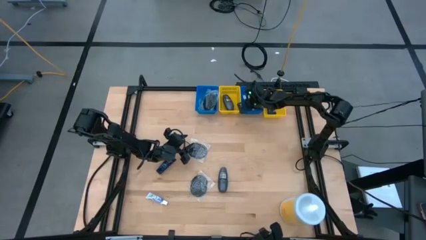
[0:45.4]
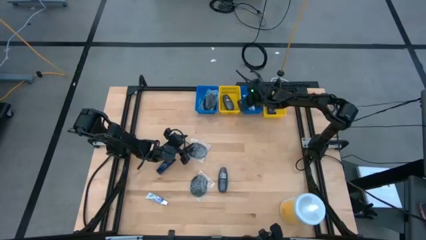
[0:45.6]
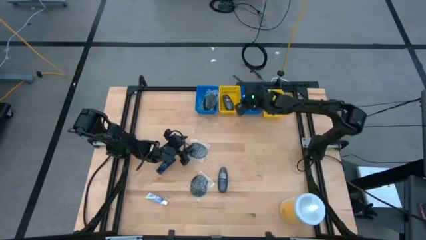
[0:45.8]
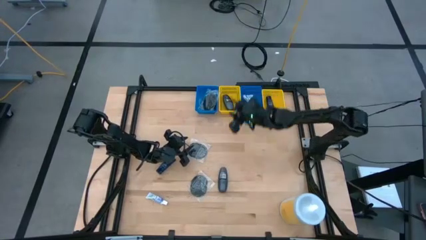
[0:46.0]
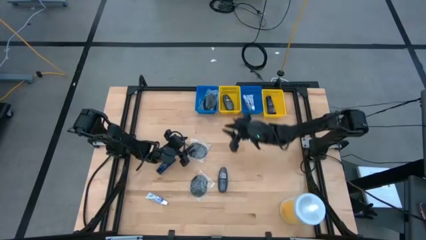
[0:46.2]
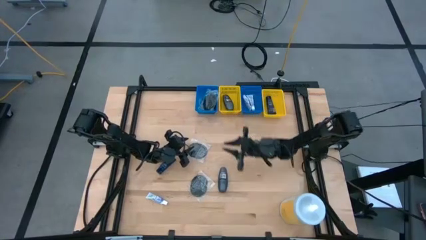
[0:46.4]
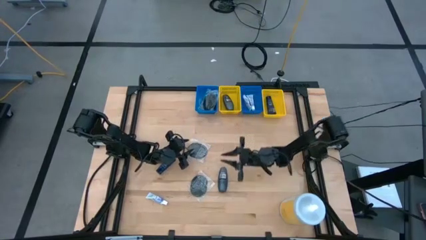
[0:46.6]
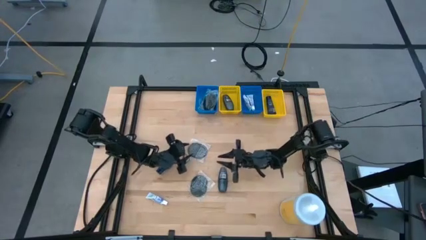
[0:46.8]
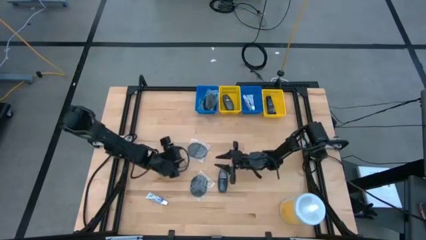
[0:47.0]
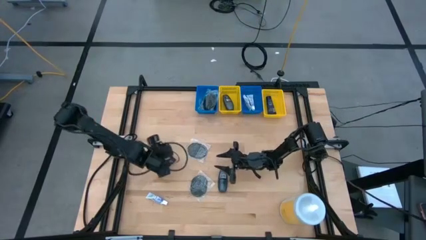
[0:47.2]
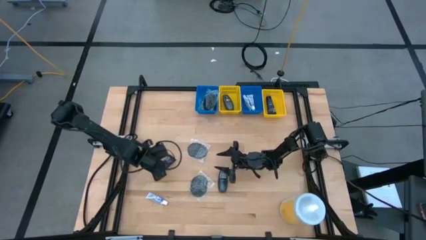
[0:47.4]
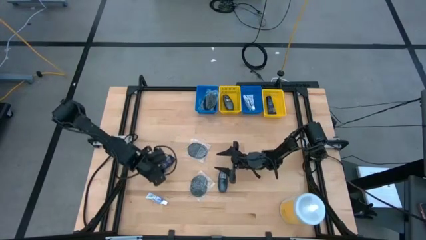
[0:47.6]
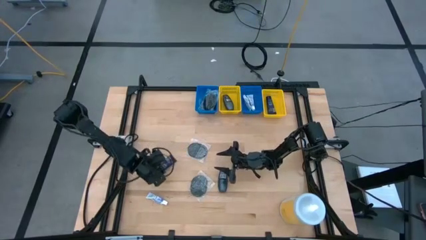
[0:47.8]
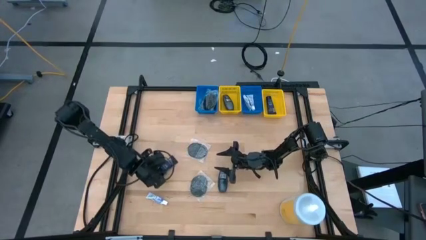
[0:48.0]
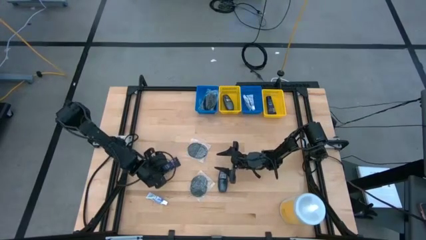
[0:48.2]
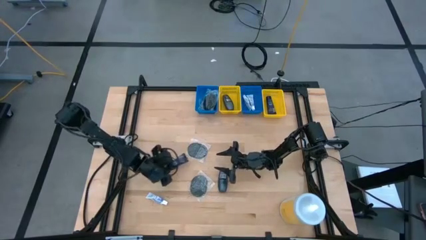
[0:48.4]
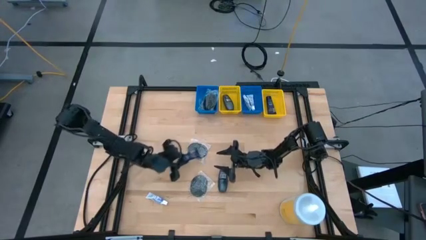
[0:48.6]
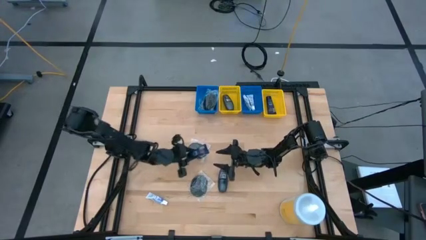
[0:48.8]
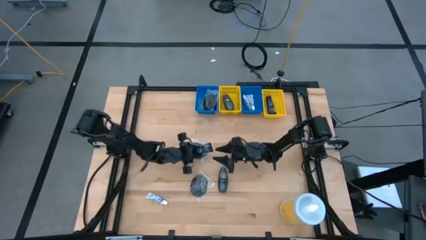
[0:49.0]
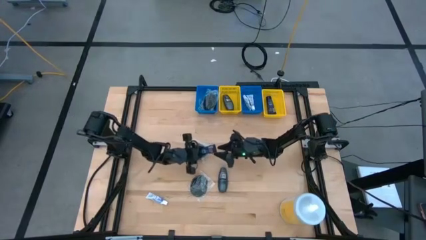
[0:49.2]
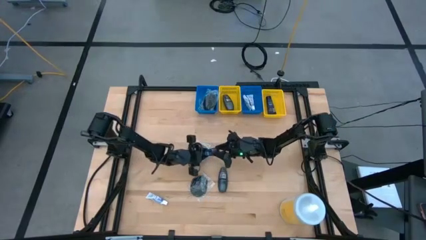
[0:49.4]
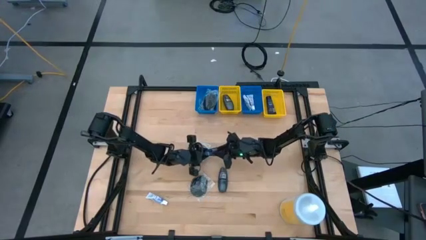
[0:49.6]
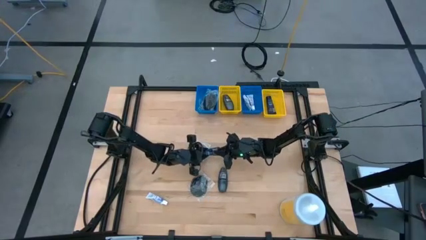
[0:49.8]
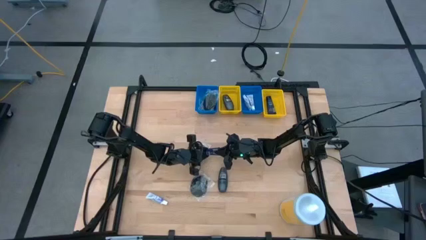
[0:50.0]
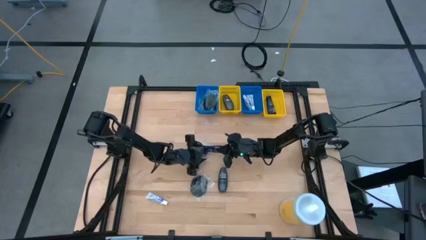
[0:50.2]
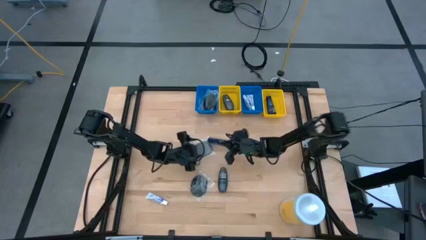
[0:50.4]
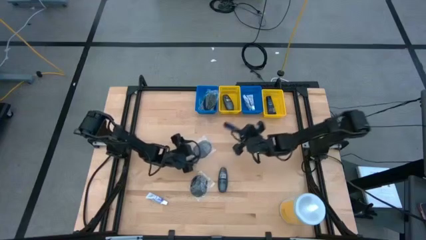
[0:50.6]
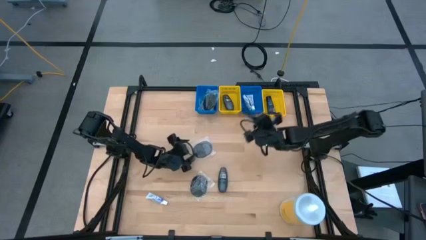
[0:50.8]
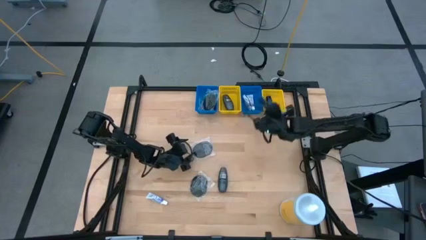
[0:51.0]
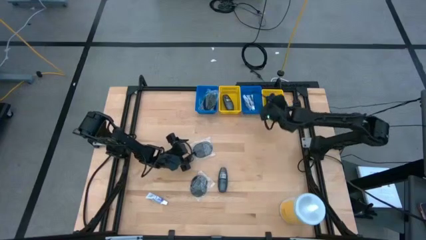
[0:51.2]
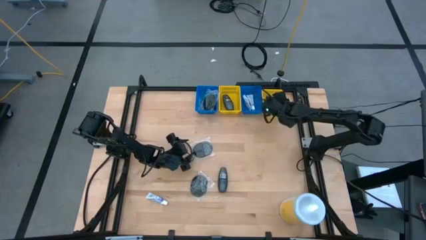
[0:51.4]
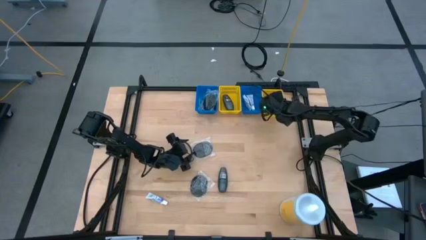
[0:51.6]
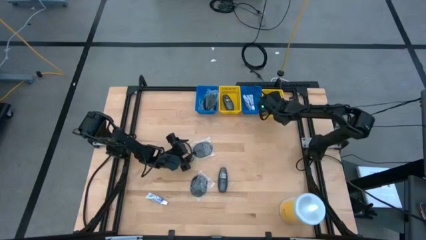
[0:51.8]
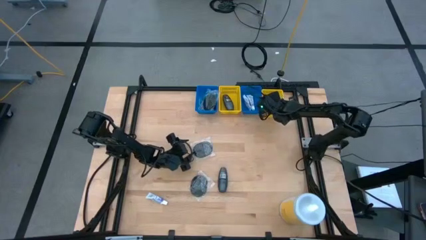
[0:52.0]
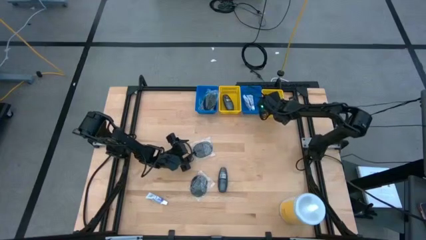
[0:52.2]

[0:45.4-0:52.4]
Task: Pick & Place Travel size toiletries
Put the blue shave cream into the right yellow bin

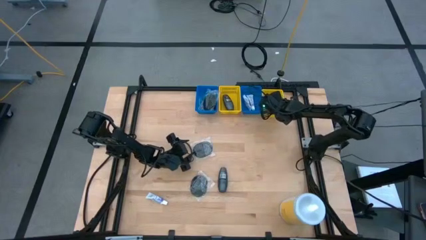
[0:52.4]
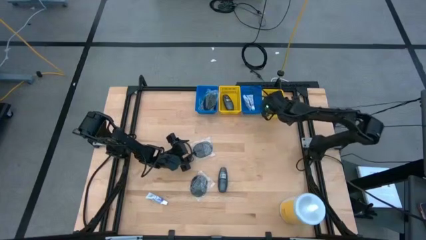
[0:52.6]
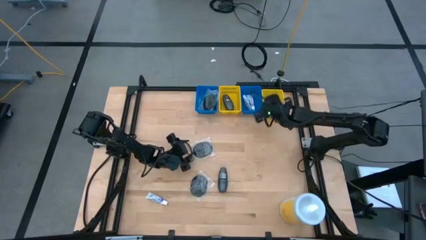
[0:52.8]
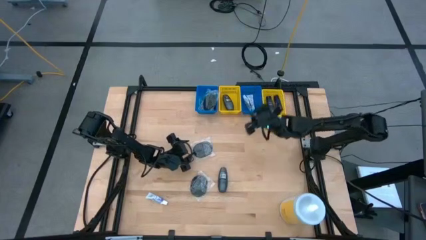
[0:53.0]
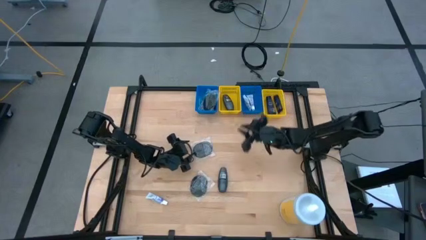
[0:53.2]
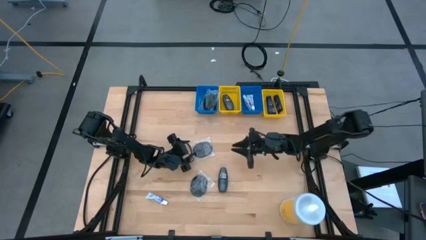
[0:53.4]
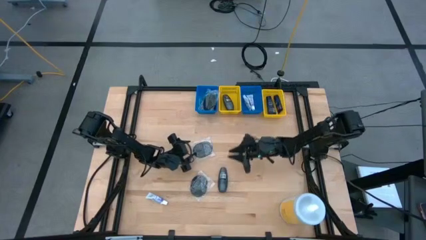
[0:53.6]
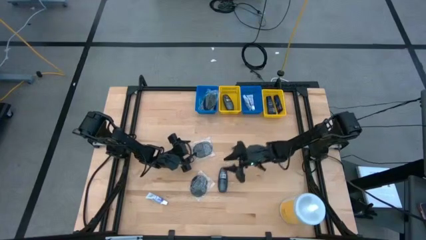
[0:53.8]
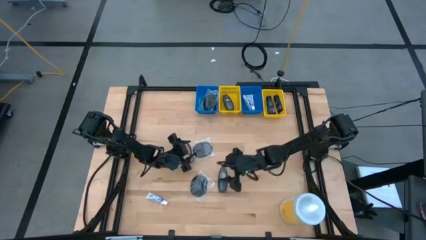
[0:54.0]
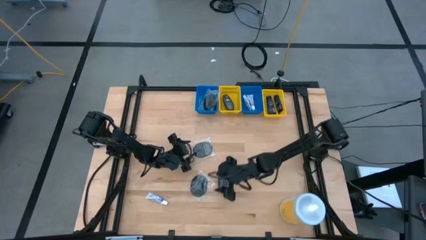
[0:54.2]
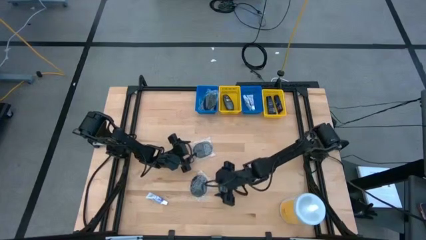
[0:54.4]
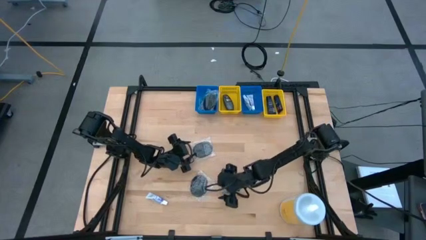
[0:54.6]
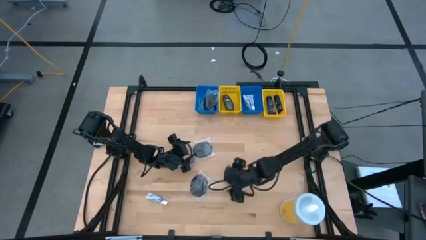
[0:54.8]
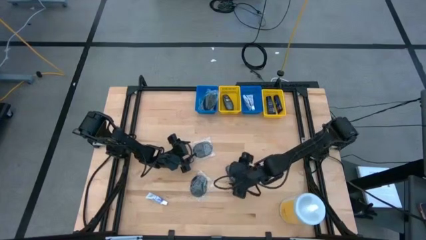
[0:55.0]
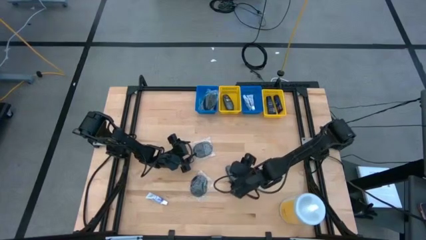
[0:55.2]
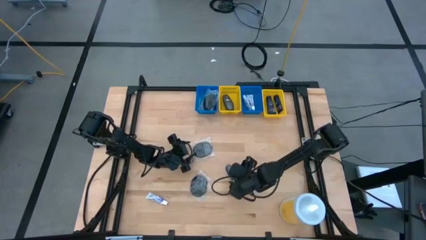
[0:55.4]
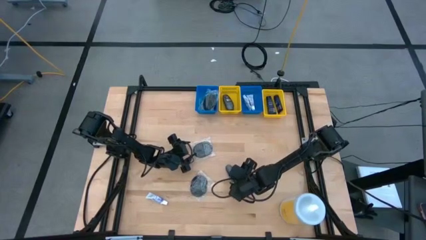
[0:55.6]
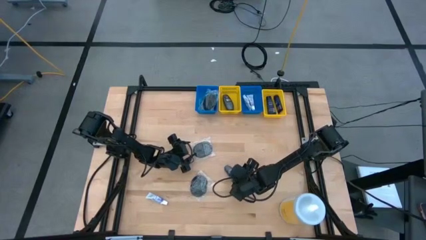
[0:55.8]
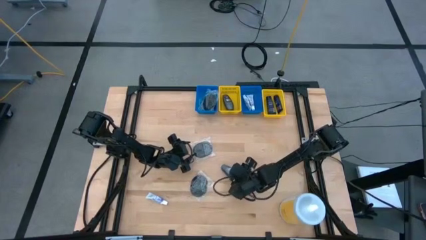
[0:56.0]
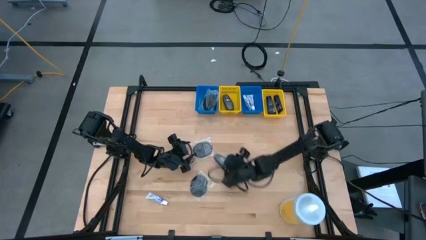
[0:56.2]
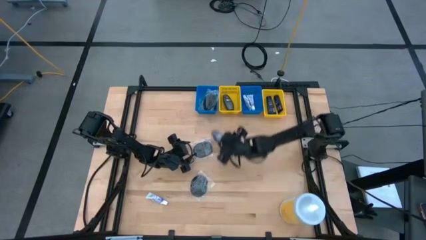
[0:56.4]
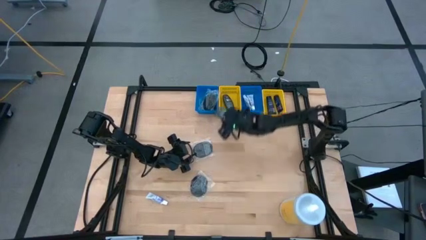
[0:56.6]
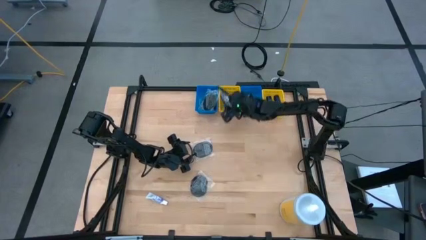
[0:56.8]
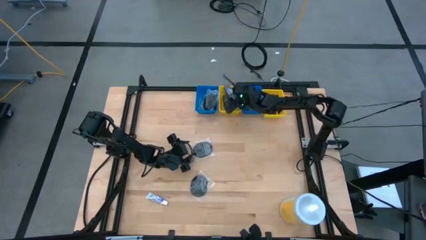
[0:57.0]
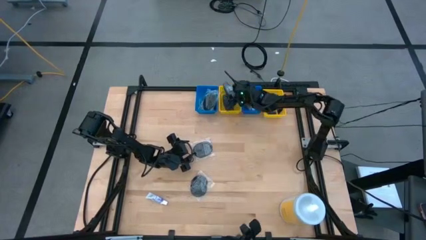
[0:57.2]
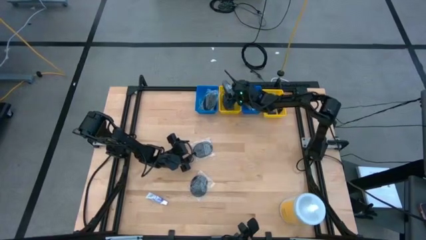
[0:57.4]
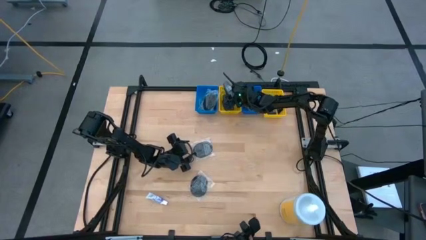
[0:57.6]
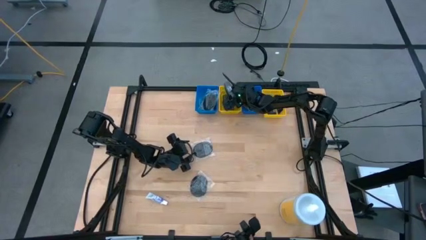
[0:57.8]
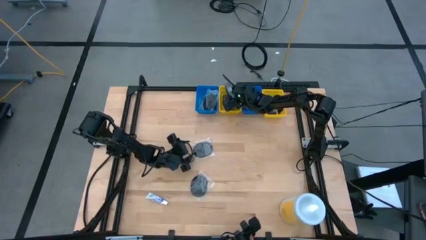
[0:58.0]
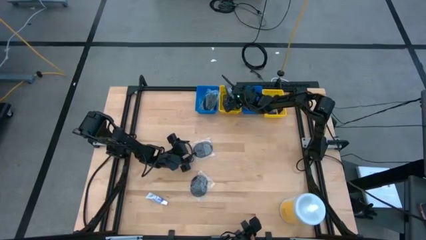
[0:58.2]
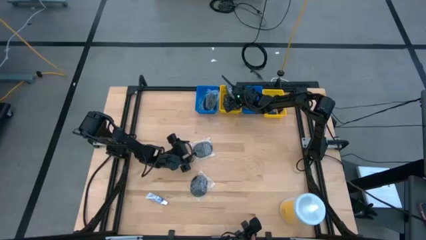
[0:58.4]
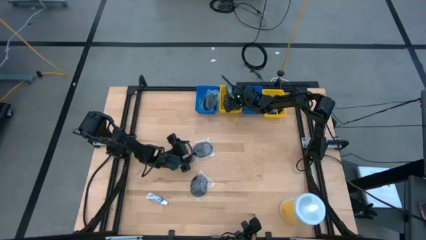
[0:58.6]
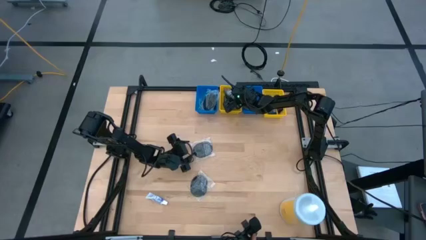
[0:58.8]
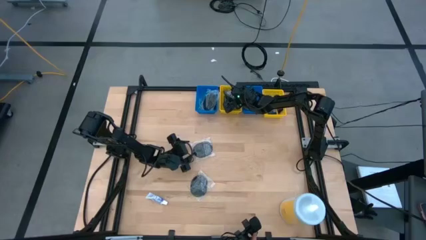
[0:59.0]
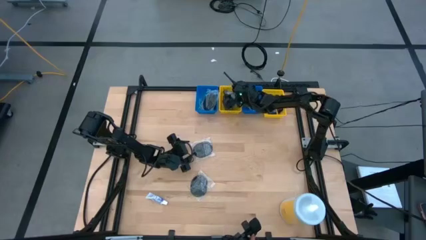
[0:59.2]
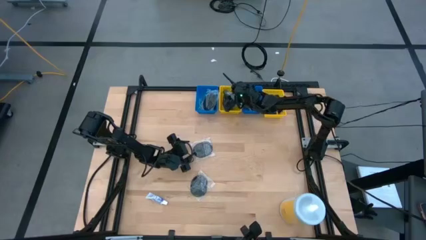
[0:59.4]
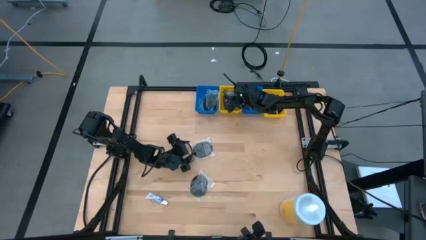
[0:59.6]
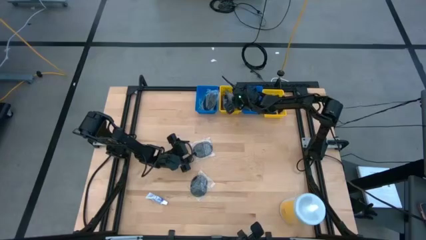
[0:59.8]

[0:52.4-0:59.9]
Put the gray deodorant into the left yellow bin
